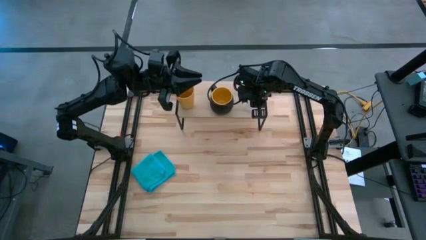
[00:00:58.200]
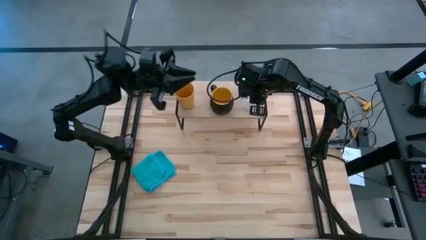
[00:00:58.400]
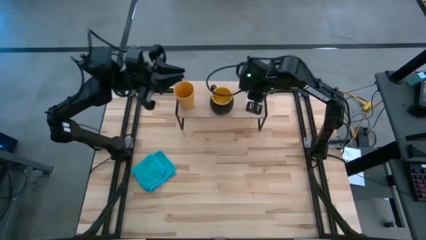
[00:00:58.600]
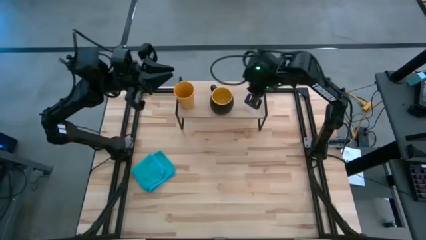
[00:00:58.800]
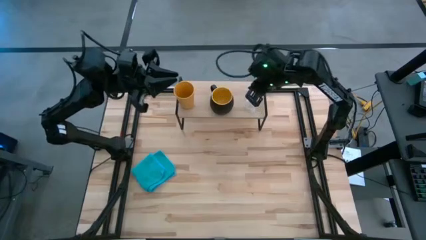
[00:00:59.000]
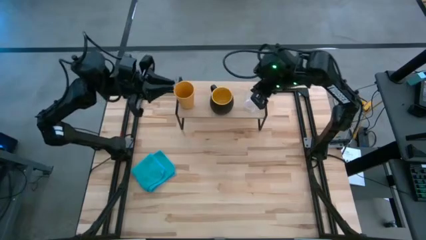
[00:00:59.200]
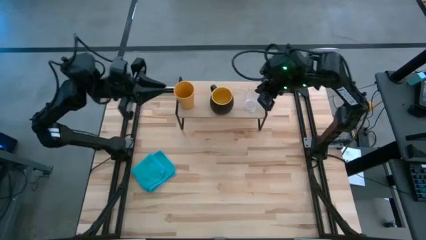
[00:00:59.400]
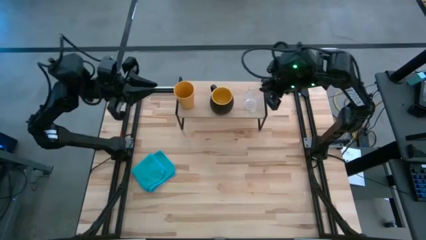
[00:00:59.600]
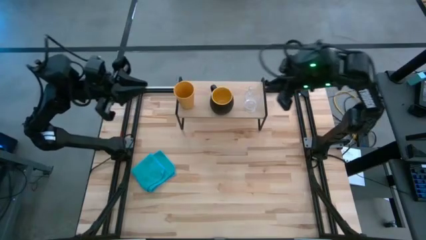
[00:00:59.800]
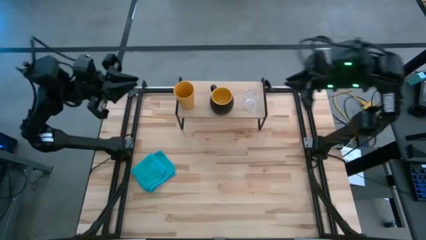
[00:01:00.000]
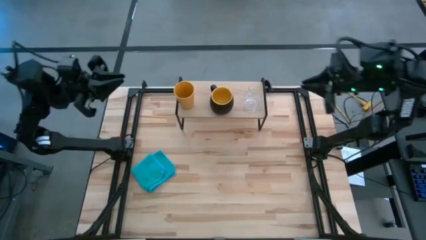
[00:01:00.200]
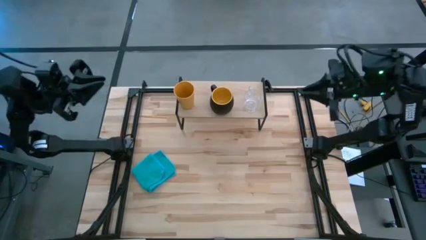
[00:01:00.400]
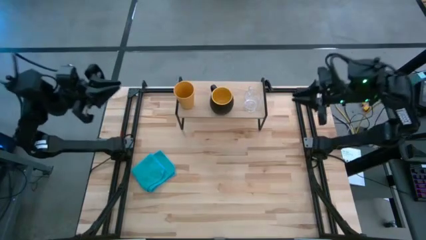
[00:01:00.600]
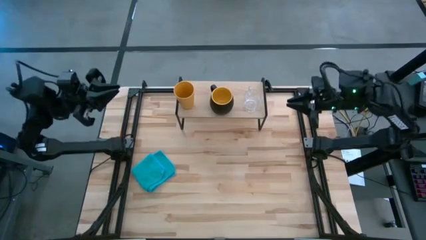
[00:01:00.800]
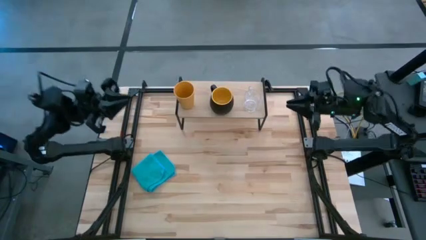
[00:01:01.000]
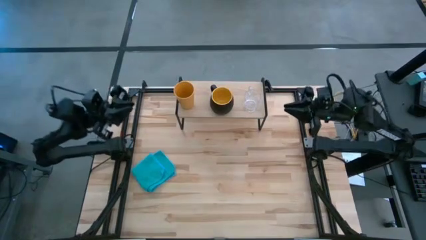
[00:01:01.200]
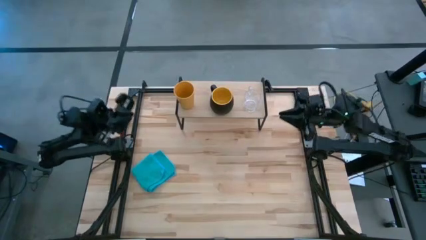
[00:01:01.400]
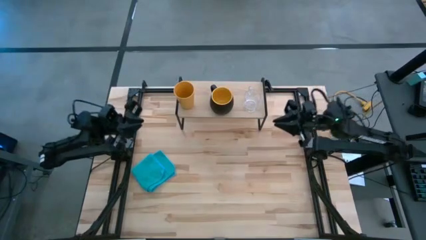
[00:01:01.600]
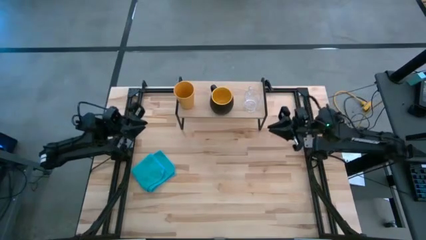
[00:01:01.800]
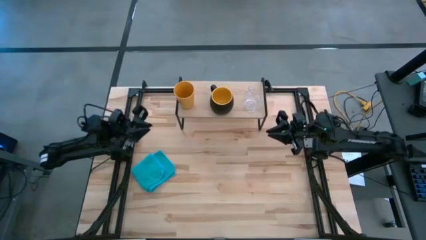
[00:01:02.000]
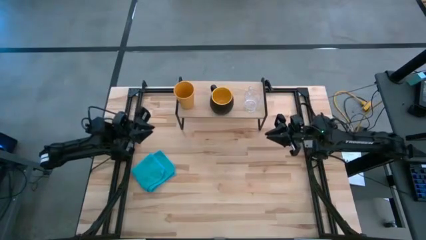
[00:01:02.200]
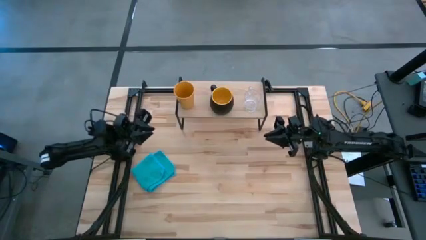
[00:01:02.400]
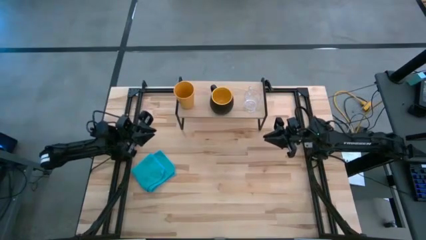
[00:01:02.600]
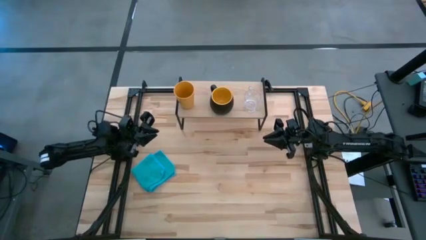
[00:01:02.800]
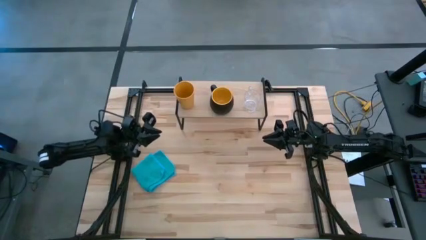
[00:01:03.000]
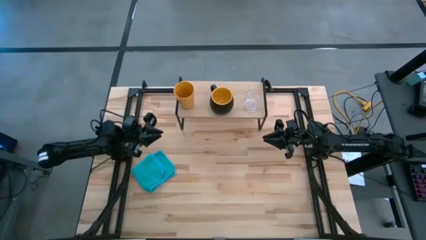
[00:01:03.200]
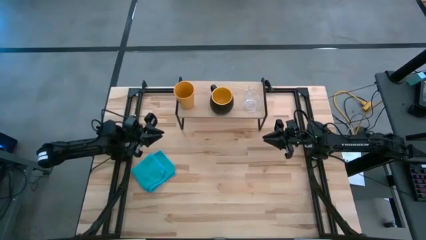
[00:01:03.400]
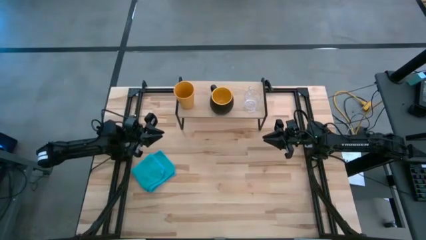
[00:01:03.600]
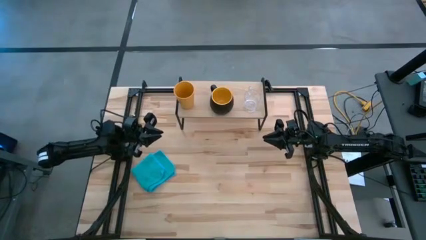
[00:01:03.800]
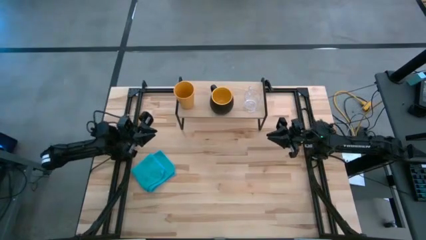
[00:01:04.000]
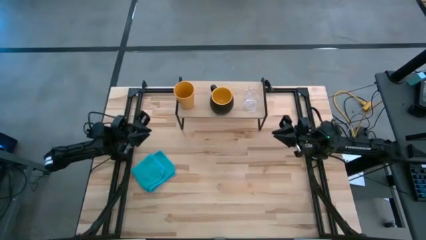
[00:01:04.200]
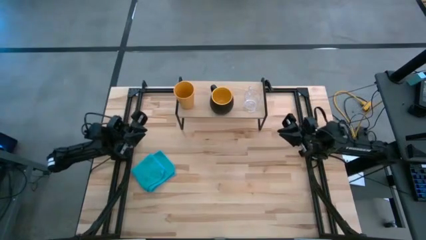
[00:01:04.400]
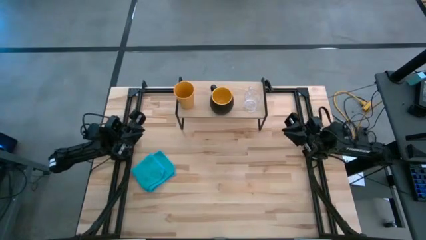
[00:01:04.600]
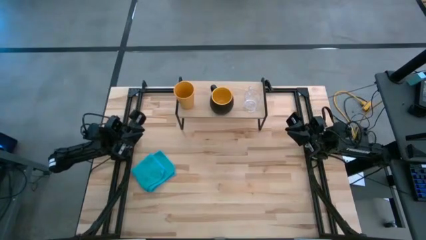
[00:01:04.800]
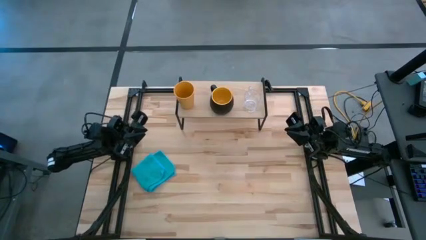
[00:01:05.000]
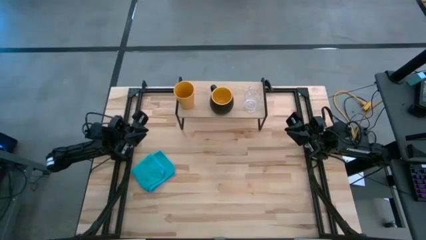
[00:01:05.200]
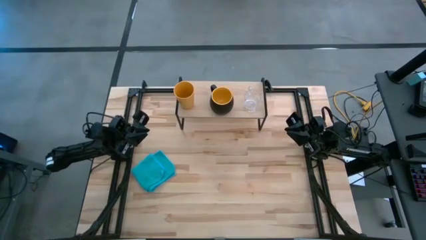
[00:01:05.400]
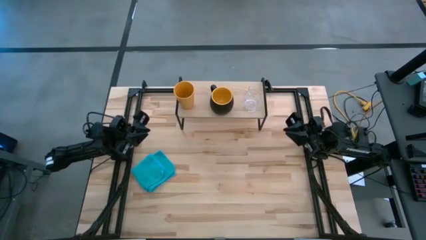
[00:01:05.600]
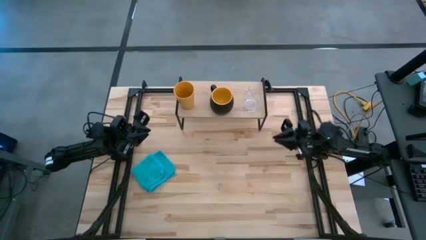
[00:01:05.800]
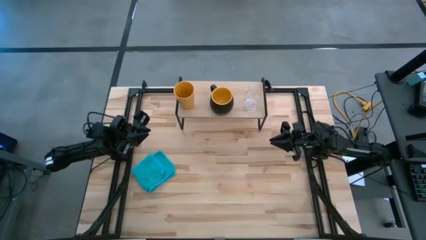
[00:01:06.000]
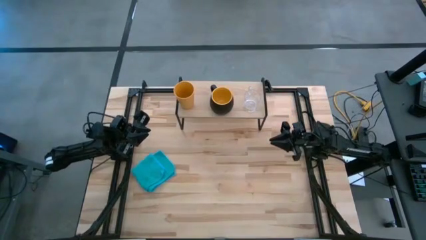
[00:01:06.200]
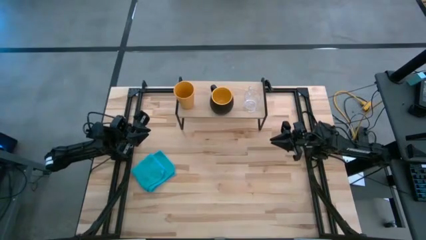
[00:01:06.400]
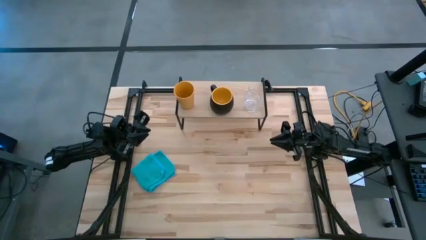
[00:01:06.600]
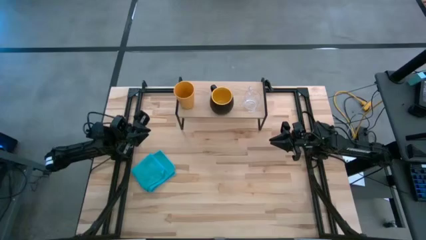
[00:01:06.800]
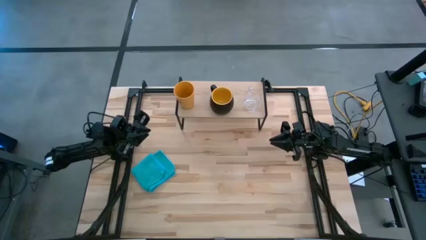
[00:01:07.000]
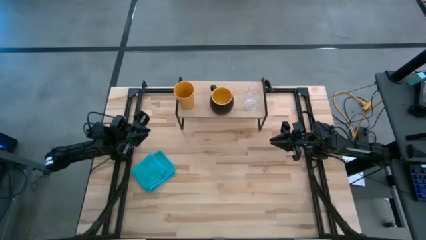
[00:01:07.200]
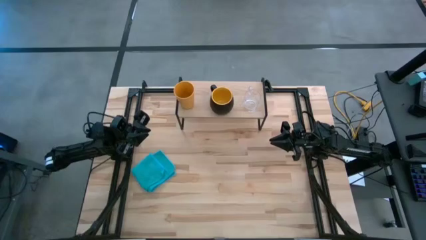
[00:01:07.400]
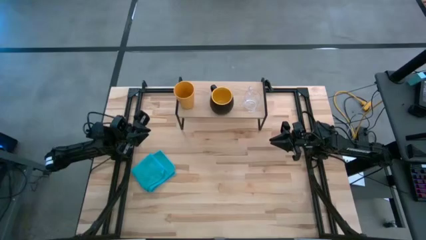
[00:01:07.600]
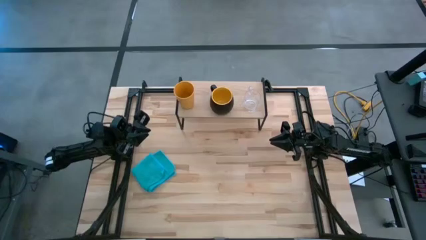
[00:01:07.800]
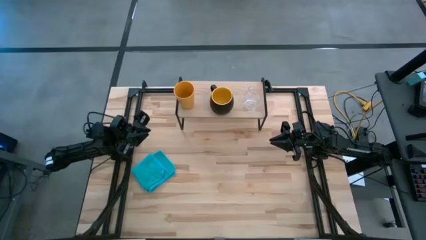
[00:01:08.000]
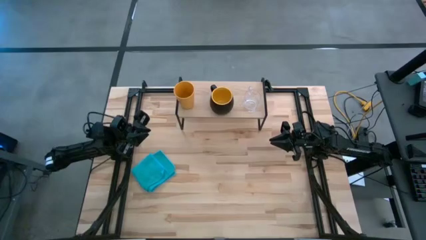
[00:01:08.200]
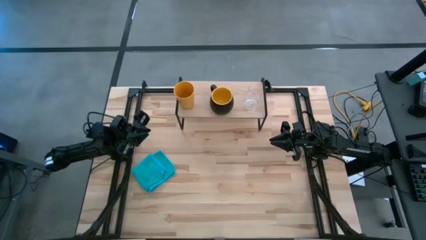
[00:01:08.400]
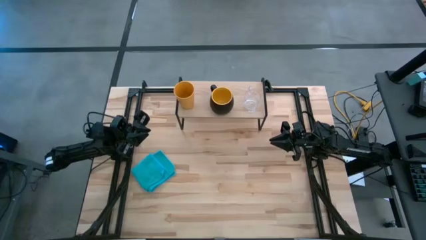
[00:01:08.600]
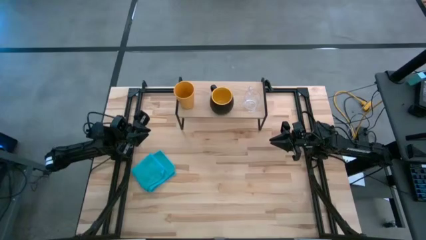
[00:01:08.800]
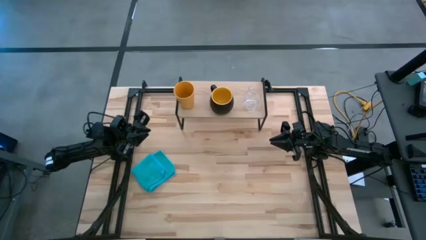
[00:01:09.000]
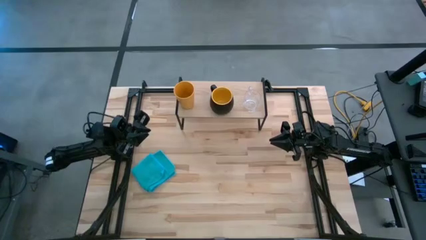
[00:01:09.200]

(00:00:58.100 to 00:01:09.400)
Task: Stack small to large cups/mugs on shelf
Return to Home Position
